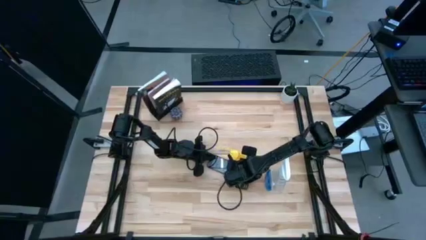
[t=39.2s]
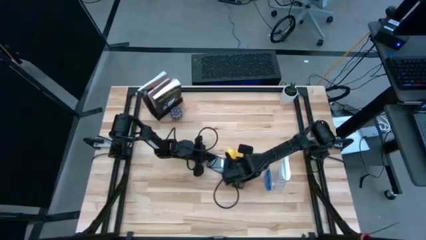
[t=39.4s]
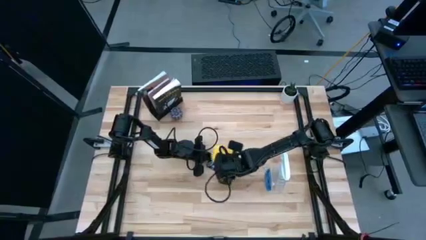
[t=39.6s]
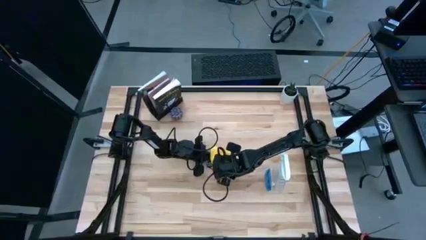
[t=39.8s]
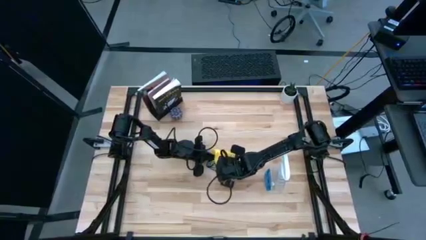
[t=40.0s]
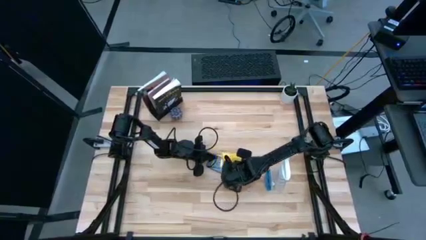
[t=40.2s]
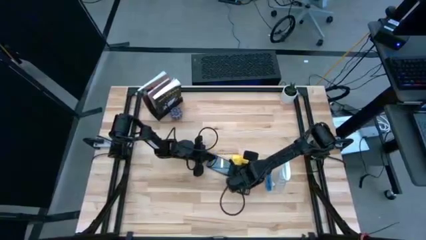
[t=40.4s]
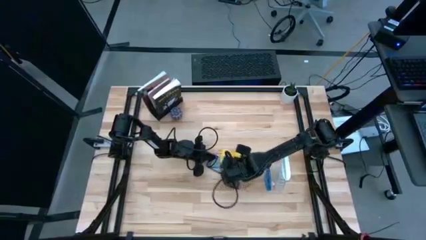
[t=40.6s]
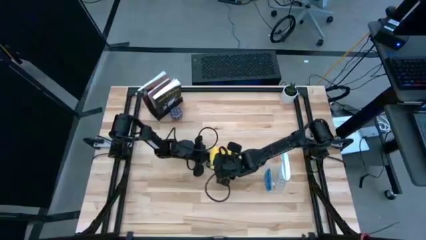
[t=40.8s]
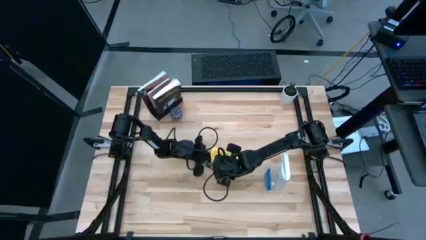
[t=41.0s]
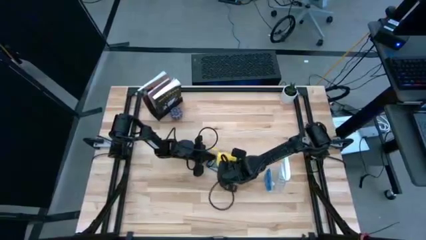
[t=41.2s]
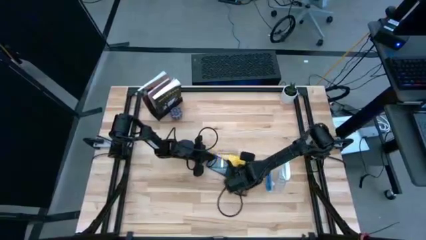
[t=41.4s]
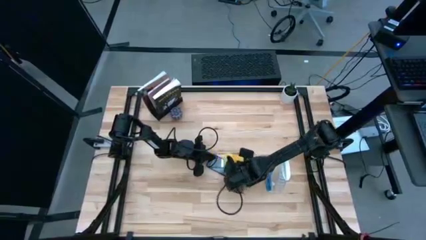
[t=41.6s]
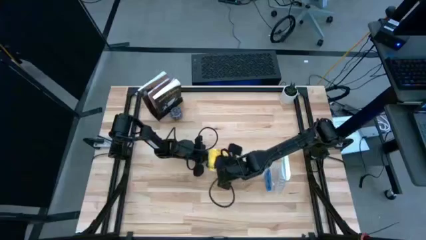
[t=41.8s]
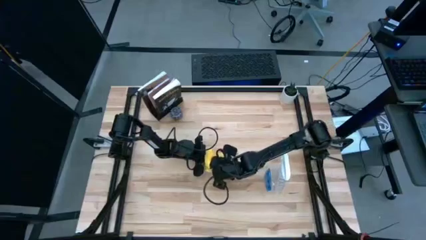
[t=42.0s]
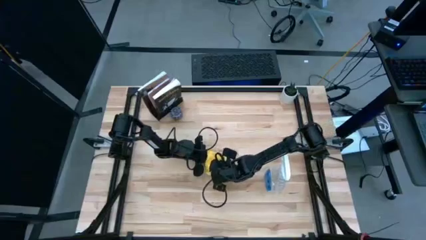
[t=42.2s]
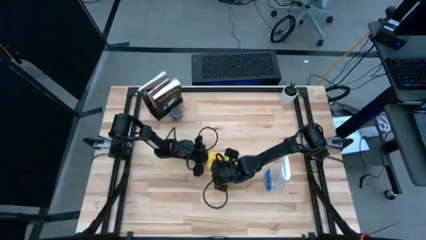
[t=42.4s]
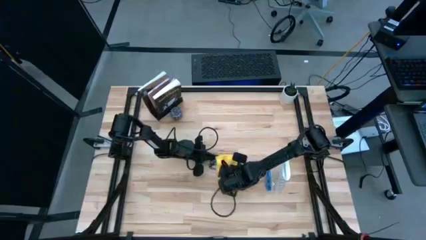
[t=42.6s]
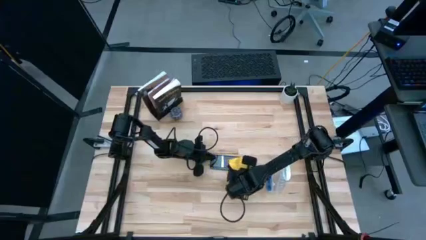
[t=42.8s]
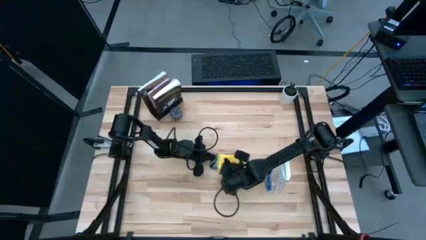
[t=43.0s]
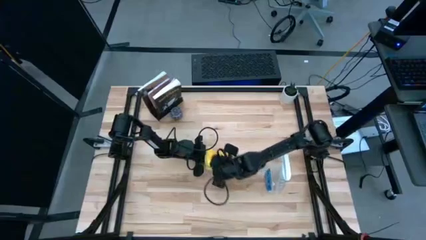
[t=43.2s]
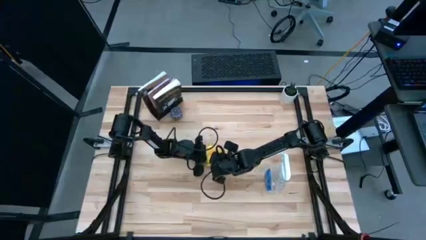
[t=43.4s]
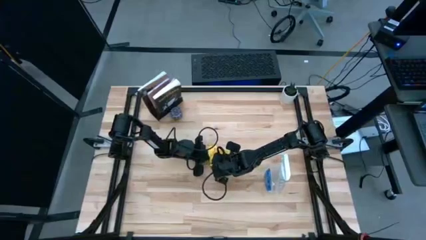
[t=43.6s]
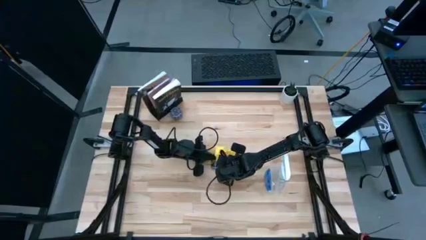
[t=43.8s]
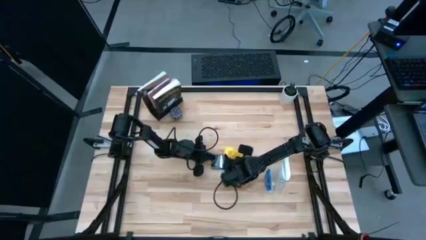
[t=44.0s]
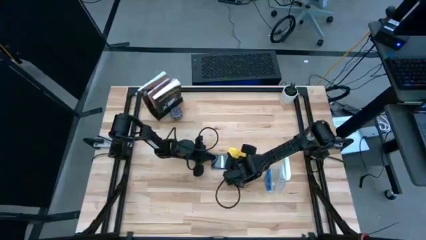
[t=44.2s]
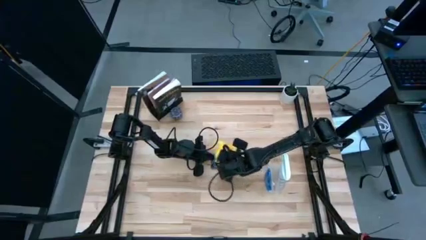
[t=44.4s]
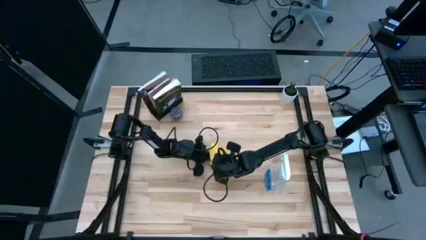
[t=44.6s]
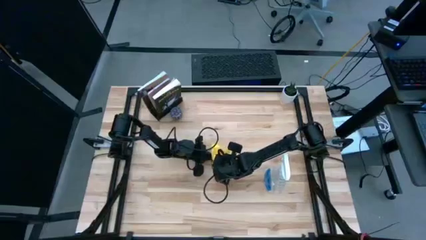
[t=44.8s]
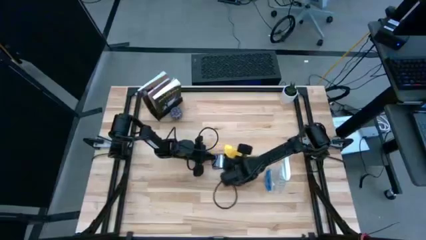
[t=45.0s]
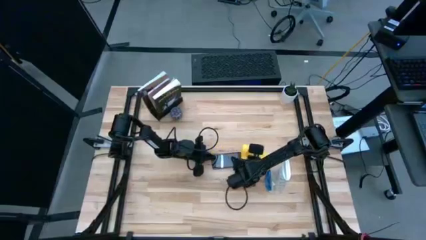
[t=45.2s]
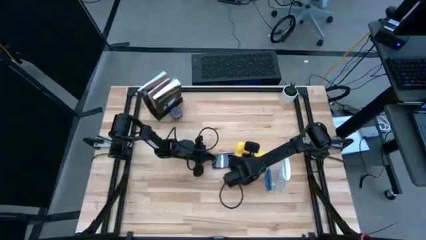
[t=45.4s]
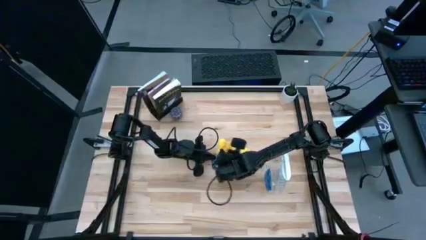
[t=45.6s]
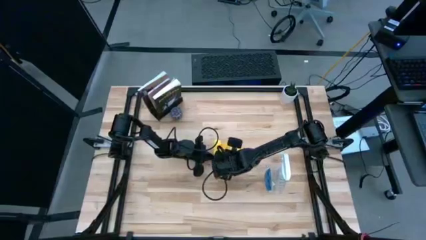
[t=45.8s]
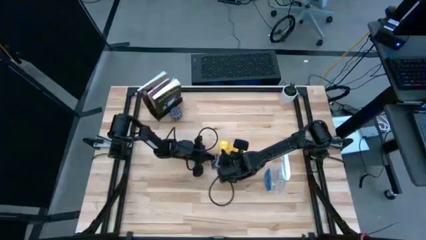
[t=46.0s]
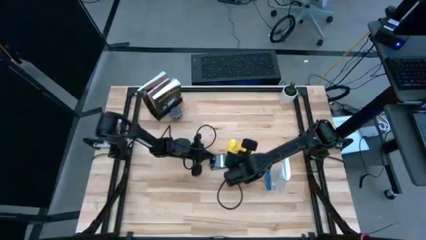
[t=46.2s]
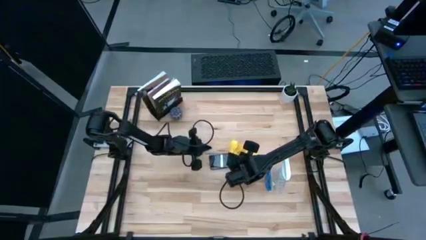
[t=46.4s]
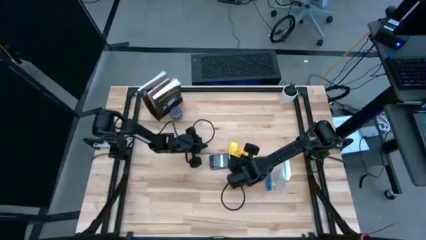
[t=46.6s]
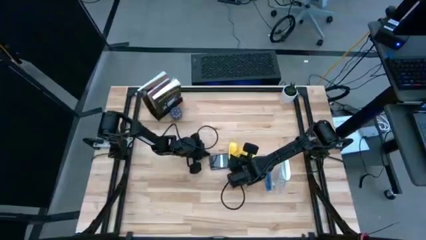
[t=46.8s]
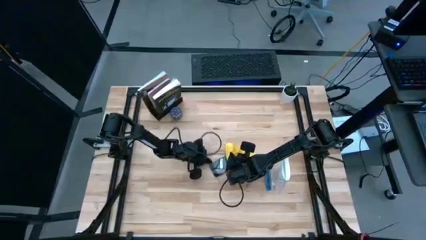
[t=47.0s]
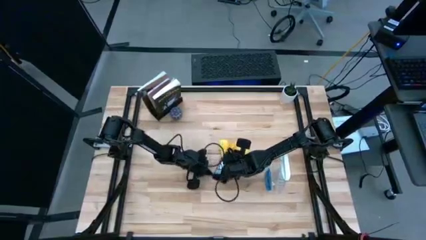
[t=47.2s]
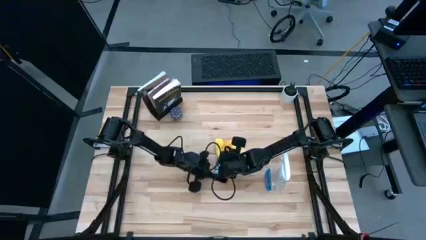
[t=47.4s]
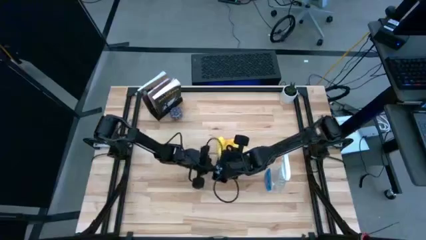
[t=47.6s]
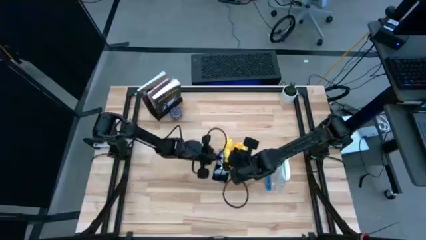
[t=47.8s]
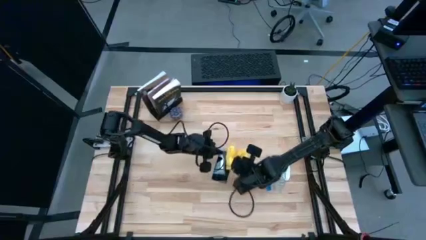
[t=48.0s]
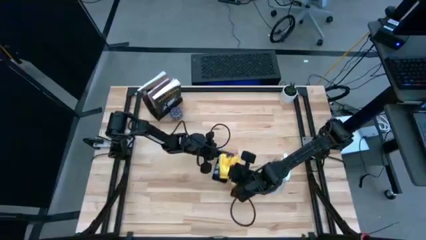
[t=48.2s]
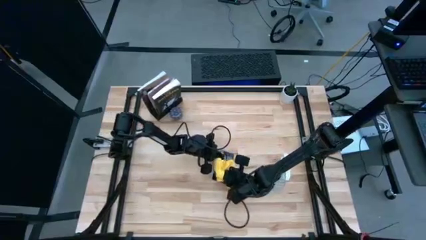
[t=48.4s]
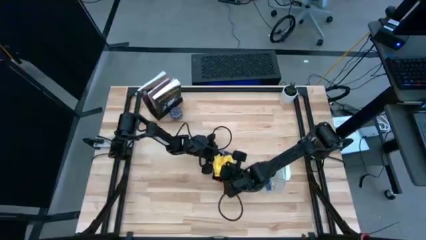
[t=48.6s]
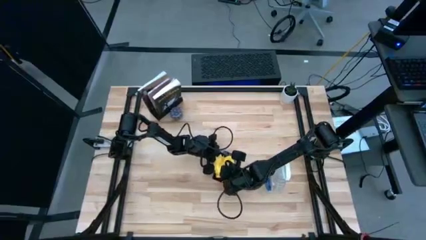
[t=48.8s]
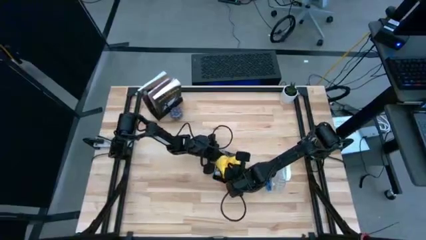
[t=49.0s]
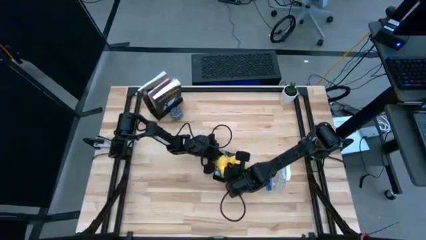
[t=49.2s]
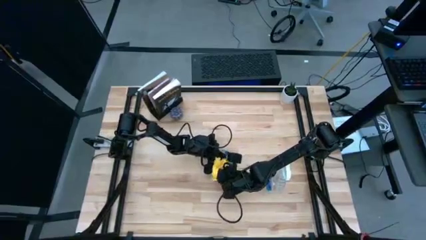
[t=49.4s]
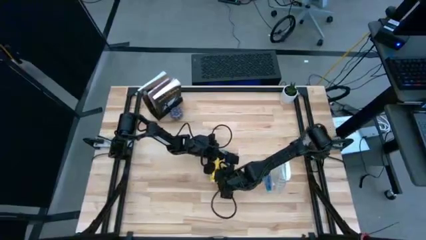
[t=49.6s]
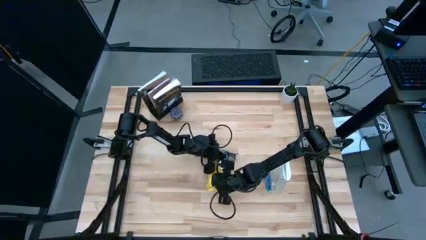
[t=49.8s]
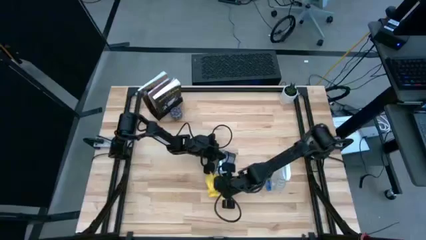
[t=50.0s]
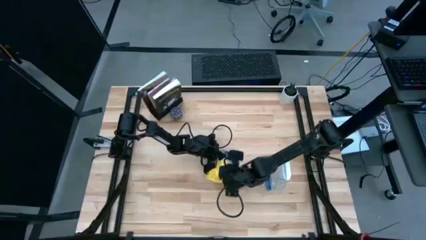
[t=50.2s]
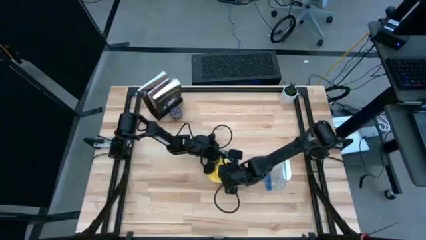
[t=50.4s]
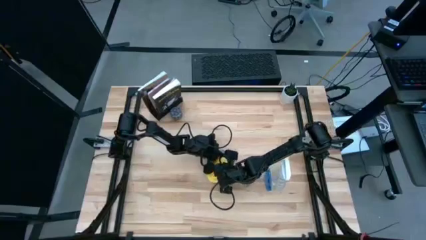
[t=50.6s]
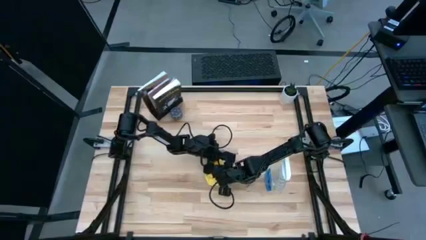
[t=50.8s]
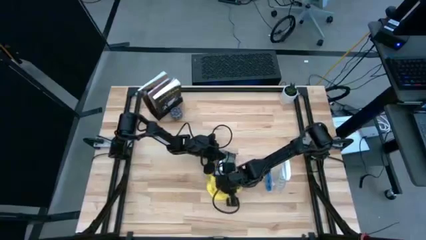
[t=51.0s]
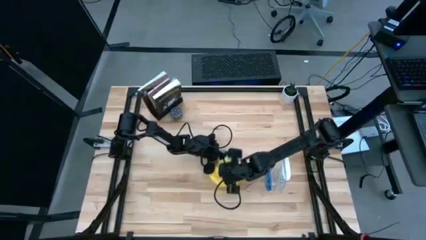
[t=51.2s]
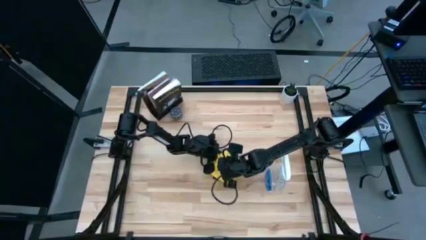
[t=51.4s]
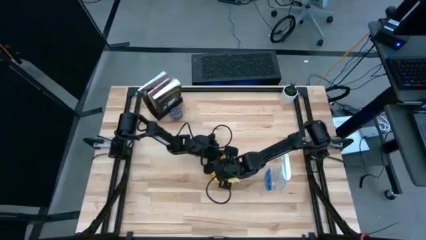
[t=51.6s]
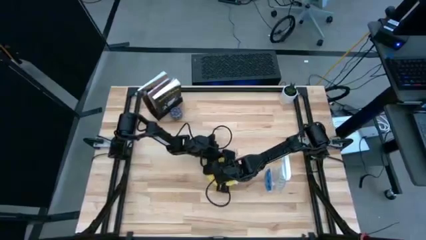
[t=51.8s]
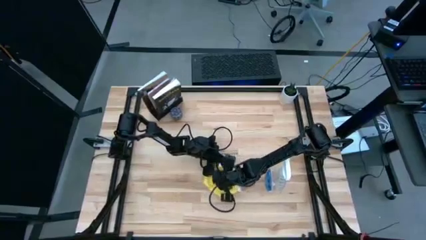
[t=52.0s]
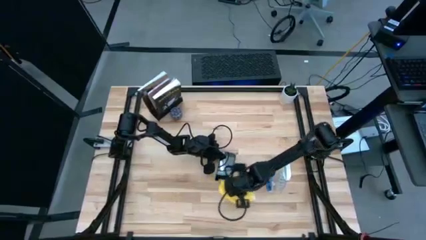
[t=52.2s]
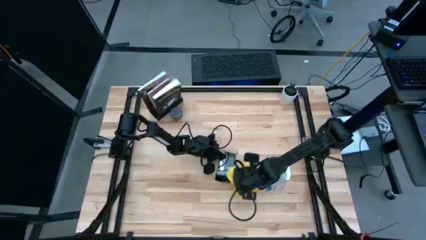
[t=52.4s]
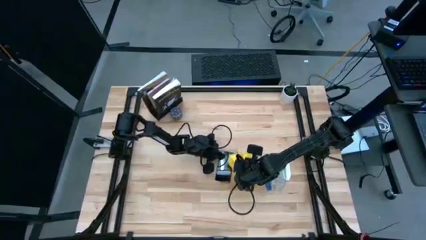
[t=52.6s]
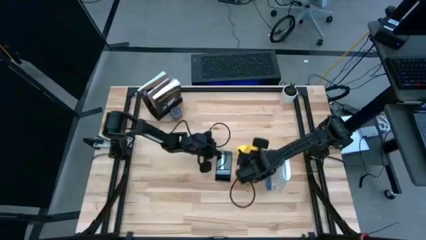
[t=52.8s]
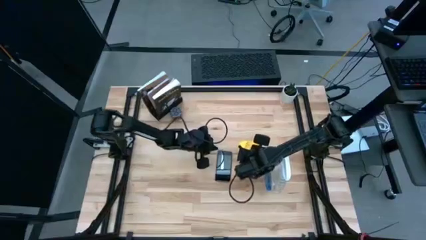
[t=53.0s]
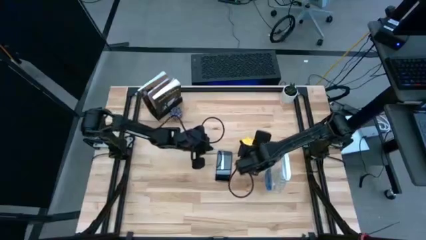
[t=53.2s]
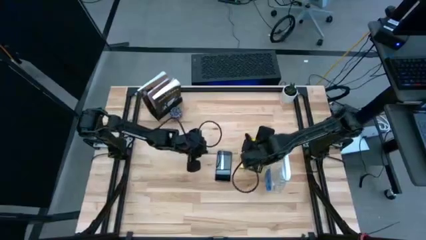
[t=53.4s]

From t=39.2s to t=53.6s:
Task: Apply microfiber cloth
Wipe the front of the pink cellphone with a yellow microfiber cloth
